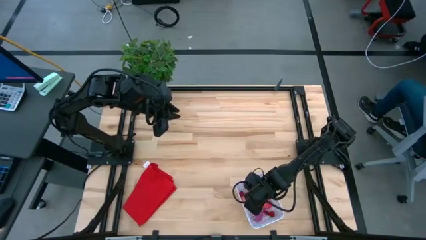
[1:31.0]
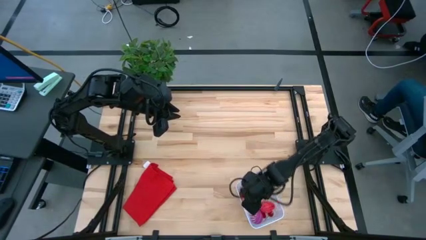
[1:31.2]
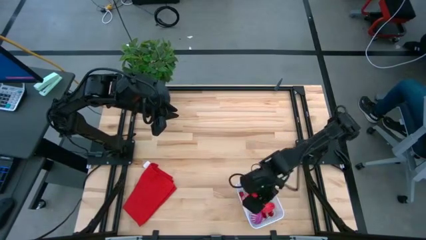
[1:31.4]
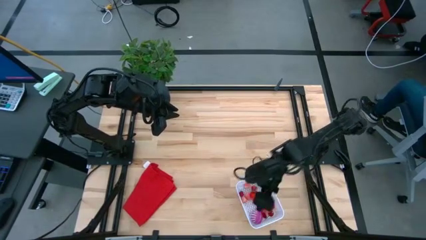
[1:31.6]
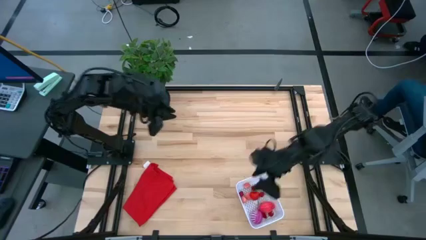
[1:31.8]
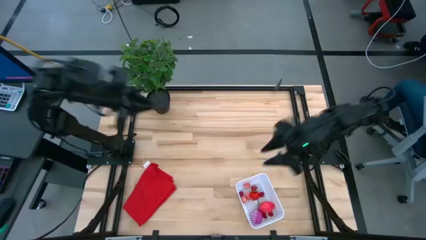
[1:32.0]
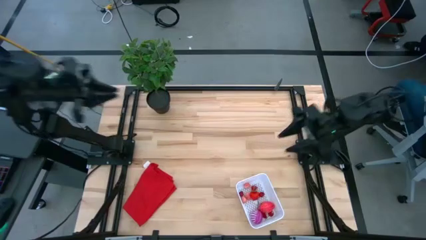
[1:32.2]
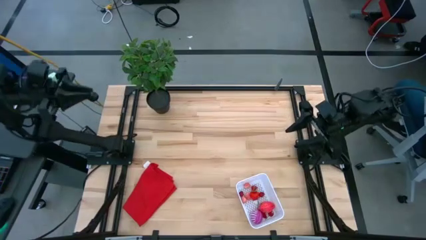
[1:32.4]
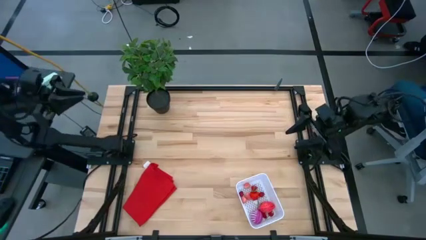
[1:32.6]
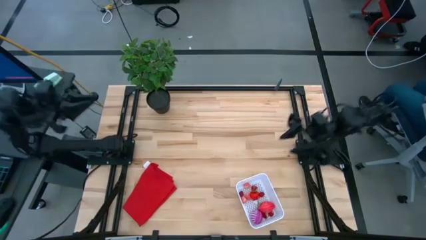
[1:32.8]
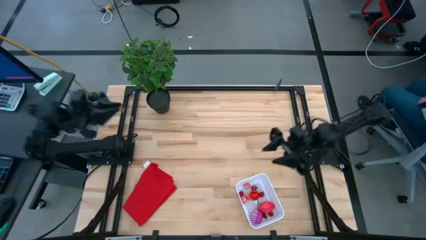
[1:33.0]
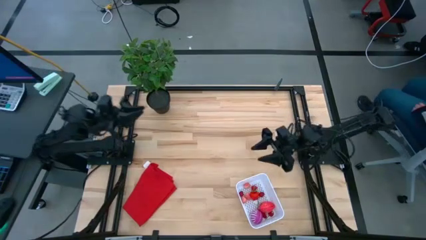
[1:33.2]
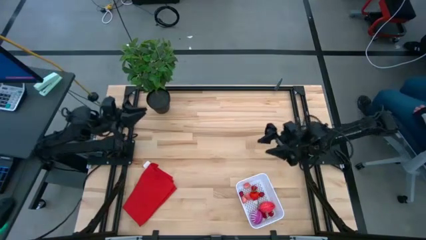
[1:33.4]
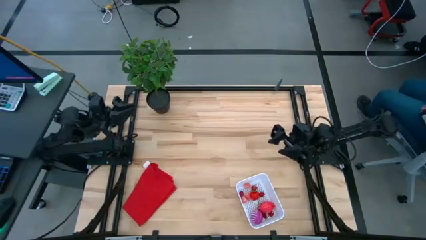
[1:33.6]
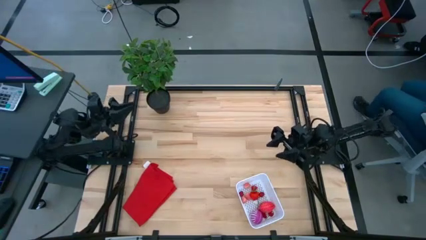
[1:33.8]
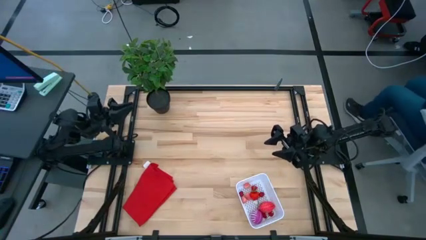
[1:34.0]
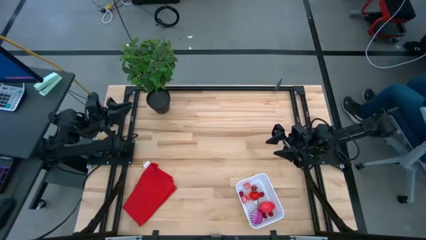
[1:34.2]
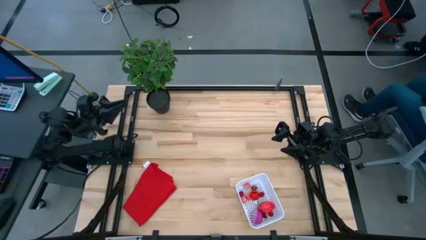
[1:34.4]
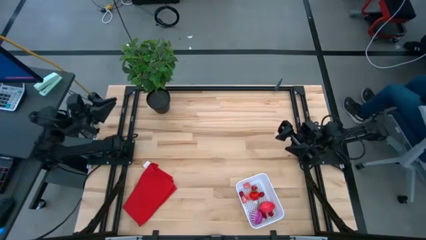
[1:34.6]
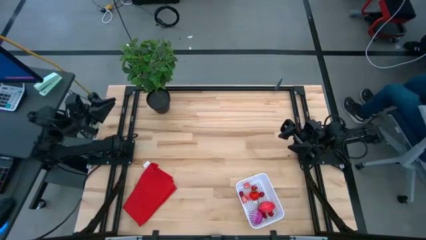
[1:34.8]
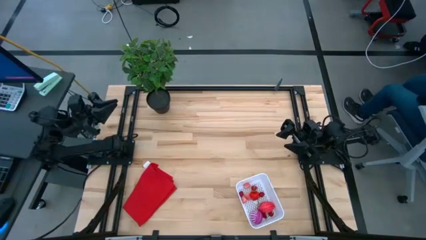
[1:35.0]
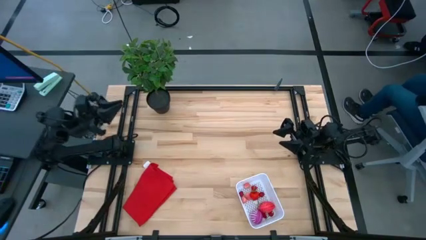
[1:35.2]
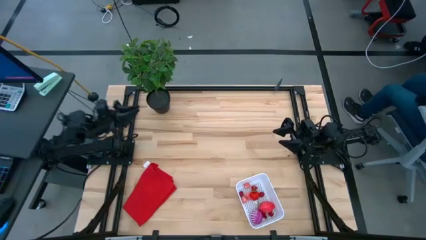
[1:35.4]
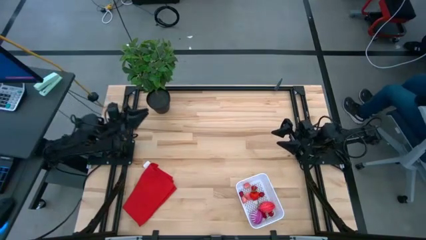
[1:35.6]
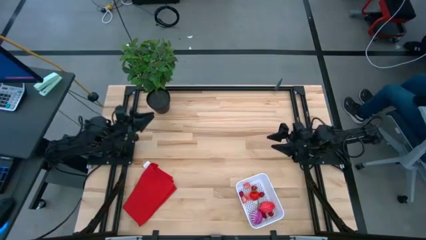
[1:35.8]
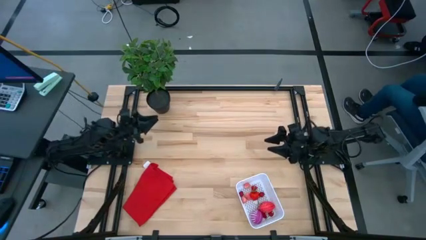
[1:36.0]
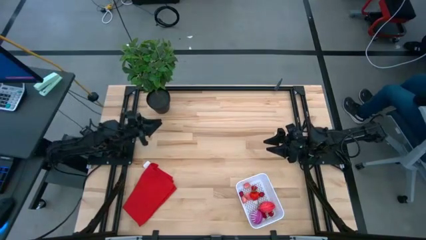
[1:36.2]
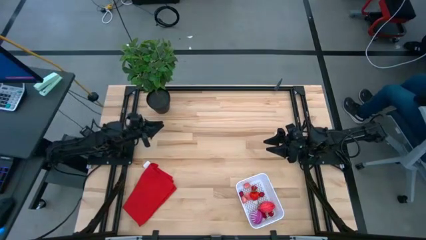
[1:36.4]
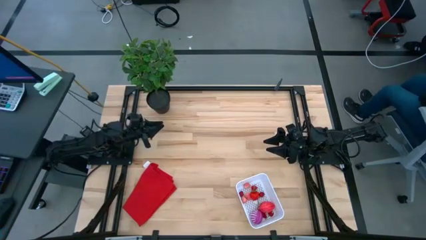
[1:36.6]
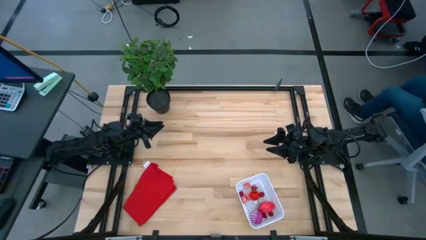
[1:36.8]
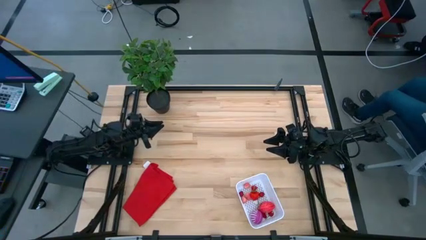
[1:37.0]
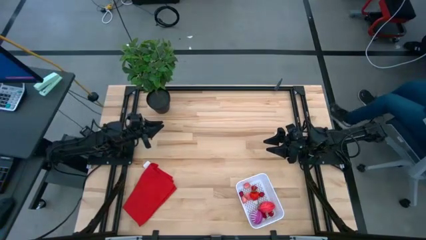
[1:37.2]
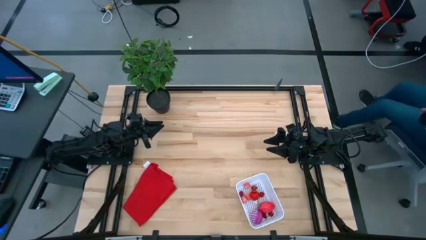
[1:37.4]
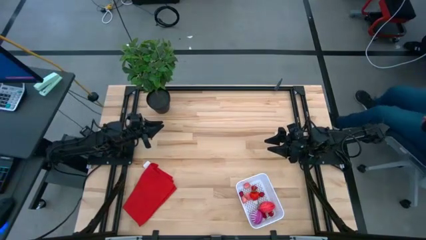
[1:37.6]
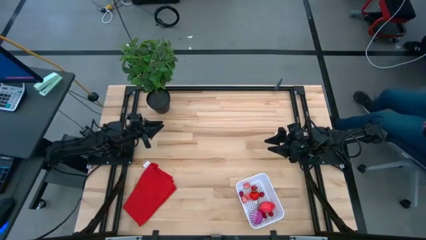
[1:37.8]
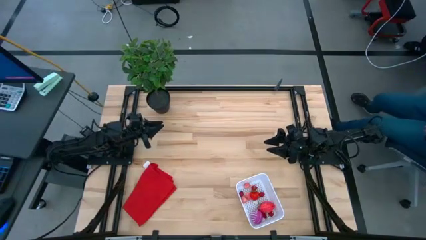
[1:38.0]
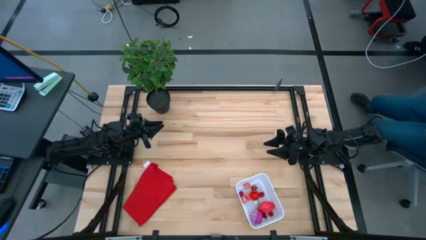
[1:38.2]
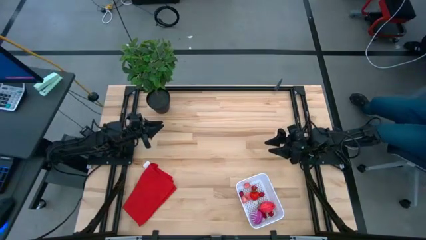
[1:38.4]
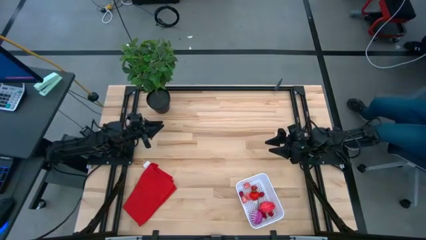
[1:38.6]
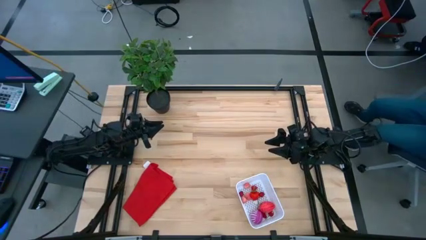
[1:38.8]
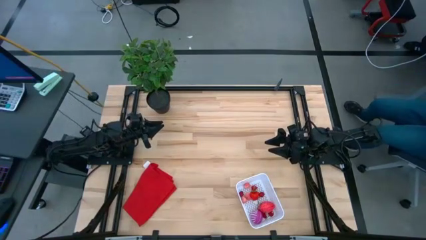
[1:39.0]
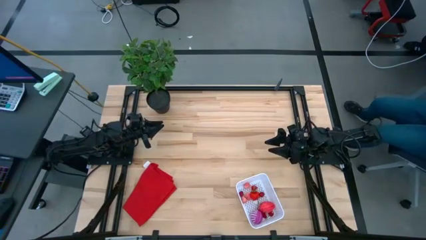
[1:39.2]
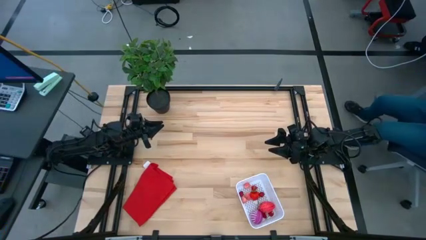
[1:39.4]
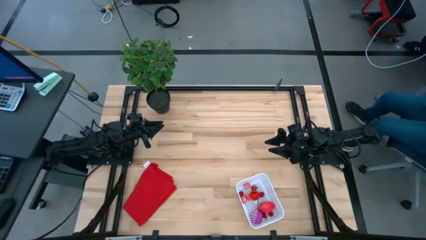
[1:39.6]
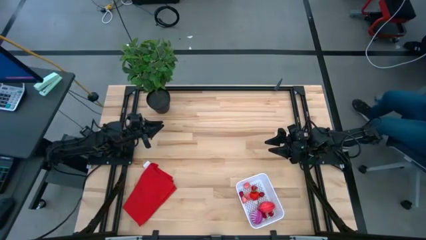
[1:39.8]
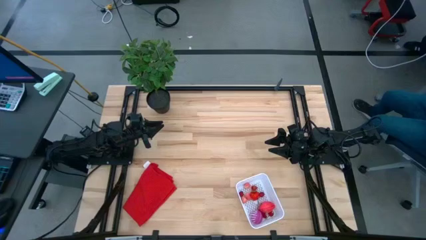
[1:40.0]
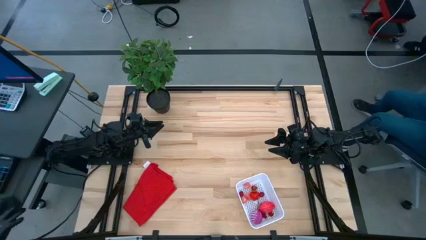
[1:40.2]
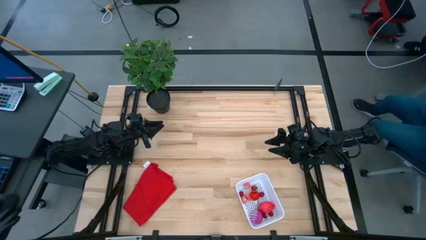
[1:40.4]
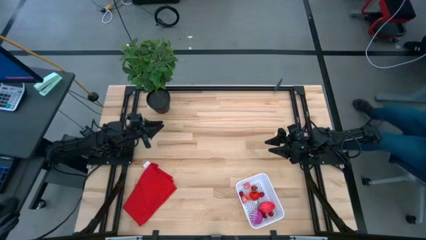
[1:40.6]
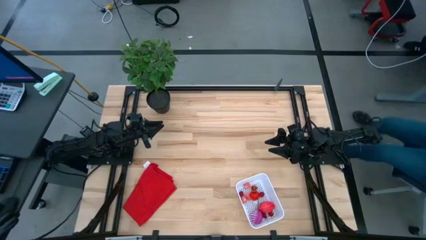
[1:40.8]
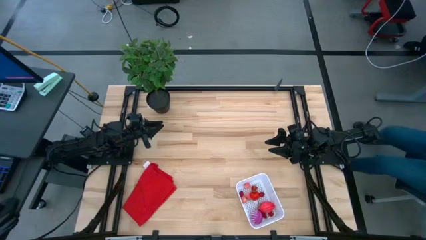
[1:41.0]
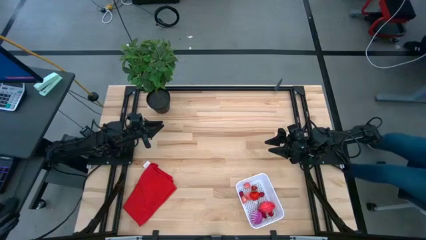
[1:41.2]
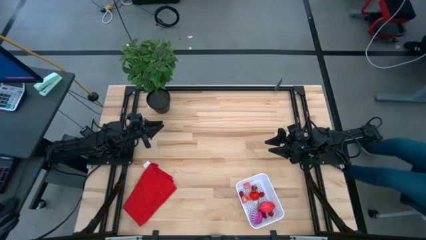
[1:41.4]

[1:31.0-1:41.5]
Task: Pick and placing Produce into tupperware
Return to Home Position

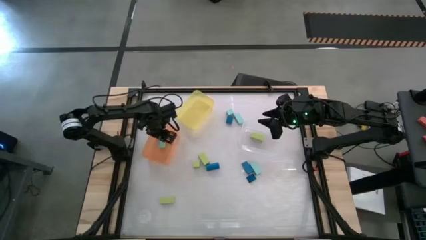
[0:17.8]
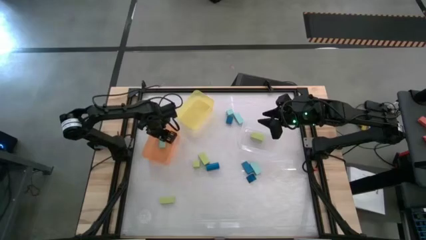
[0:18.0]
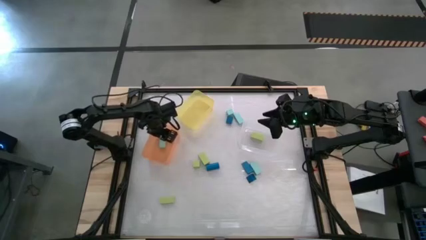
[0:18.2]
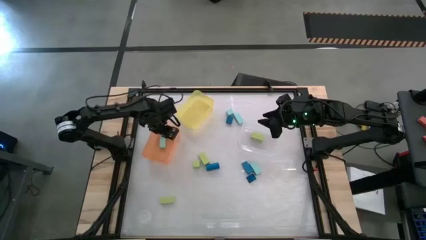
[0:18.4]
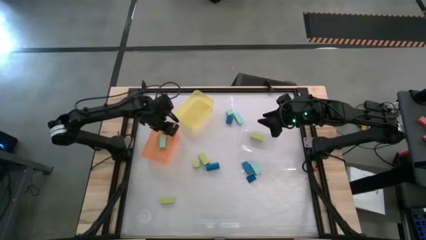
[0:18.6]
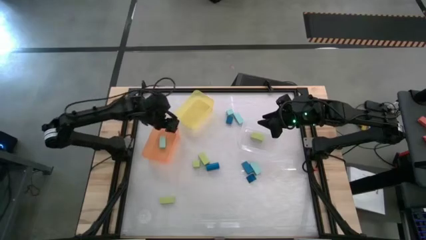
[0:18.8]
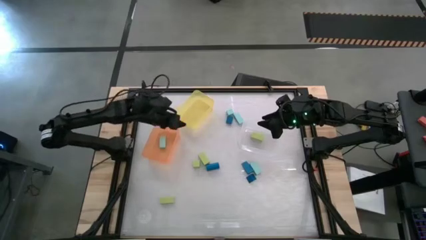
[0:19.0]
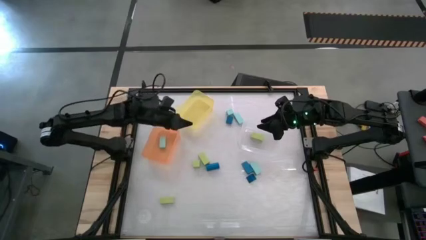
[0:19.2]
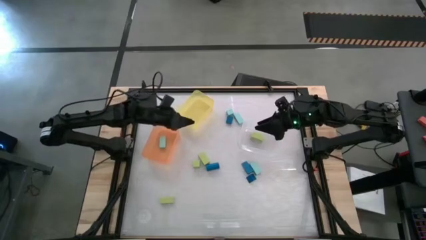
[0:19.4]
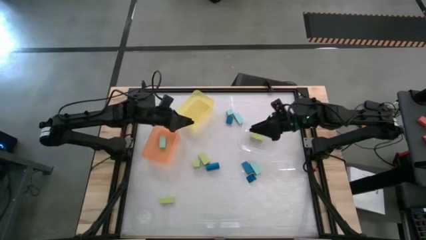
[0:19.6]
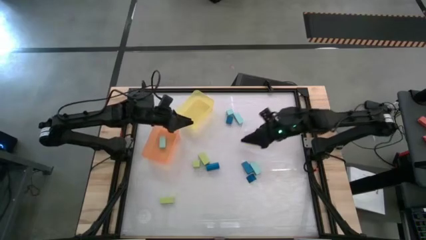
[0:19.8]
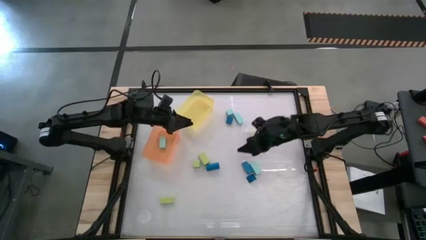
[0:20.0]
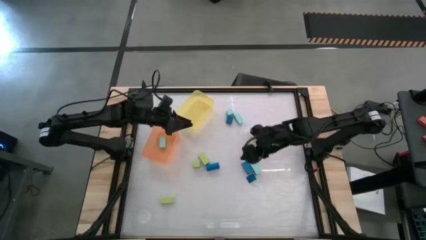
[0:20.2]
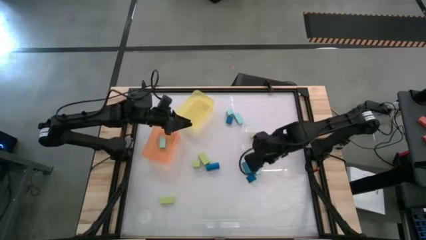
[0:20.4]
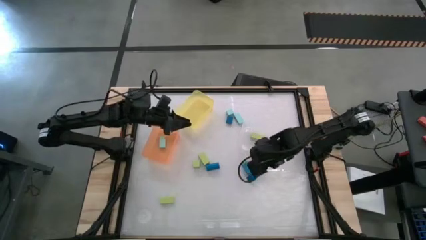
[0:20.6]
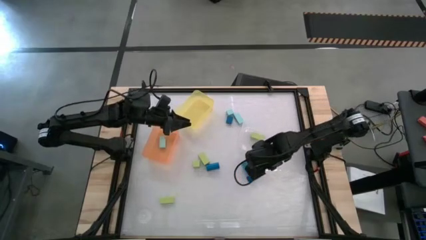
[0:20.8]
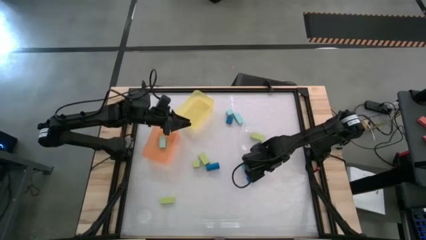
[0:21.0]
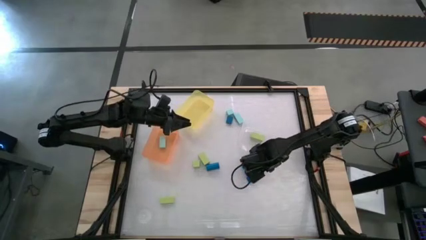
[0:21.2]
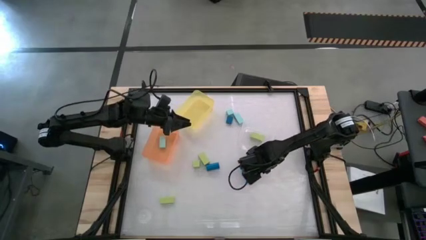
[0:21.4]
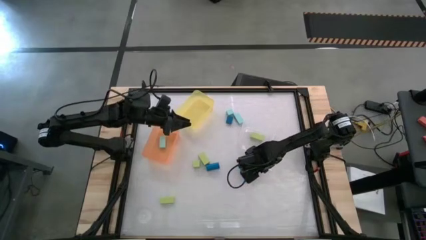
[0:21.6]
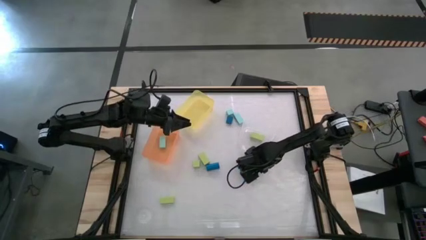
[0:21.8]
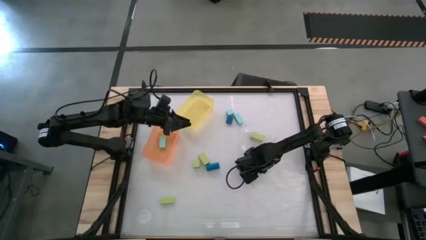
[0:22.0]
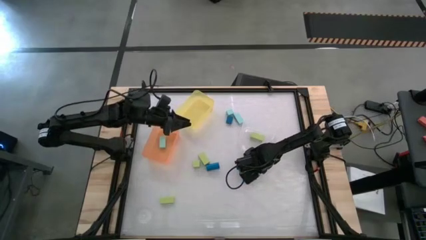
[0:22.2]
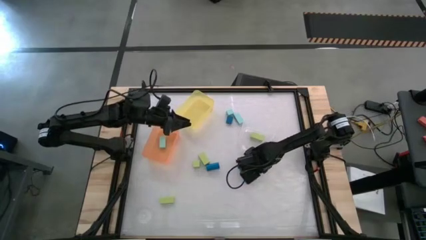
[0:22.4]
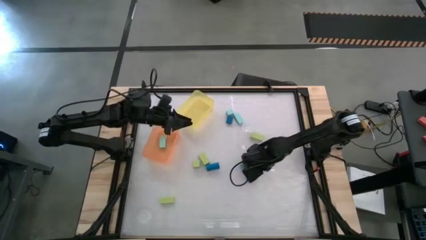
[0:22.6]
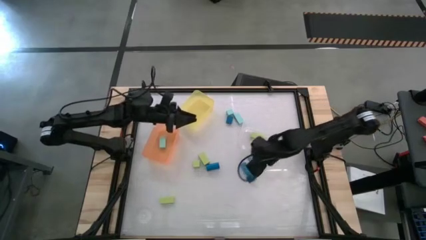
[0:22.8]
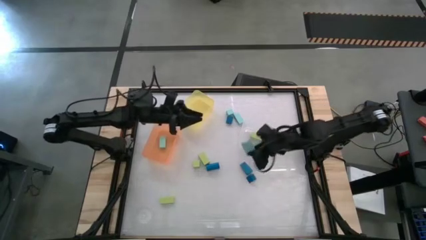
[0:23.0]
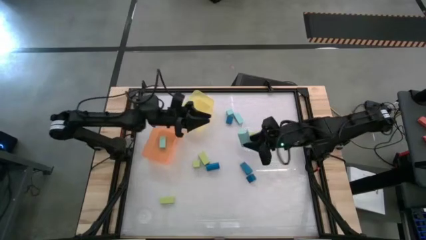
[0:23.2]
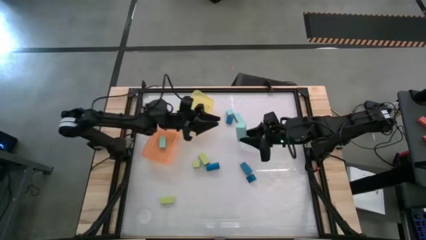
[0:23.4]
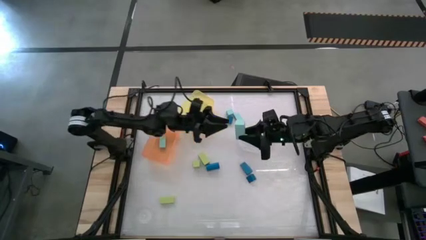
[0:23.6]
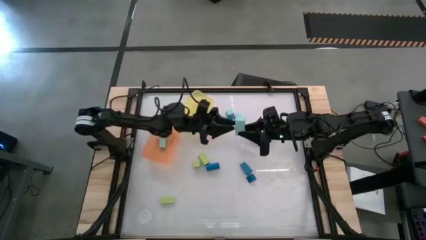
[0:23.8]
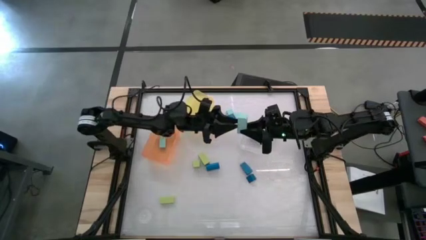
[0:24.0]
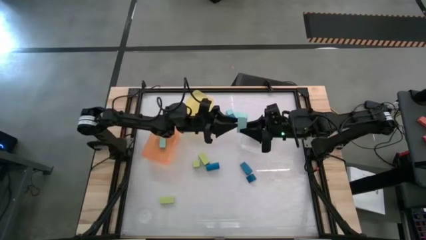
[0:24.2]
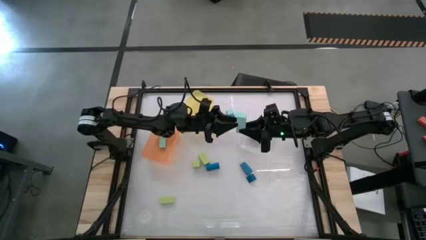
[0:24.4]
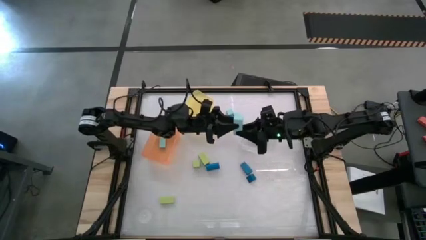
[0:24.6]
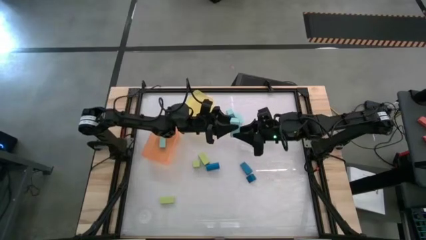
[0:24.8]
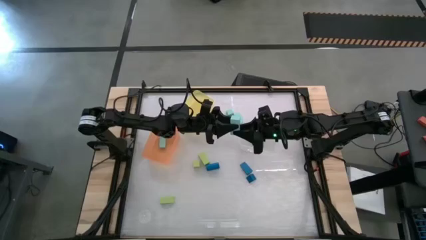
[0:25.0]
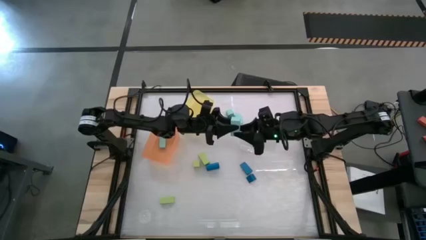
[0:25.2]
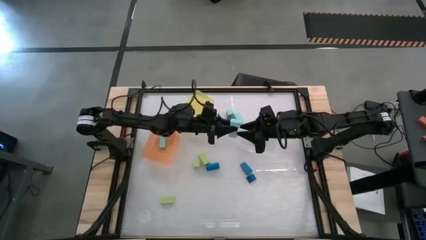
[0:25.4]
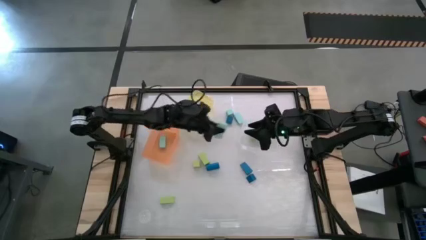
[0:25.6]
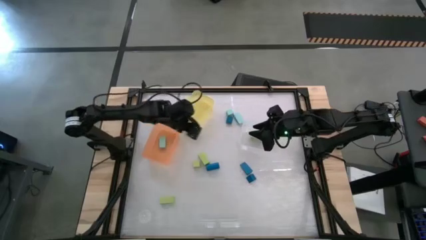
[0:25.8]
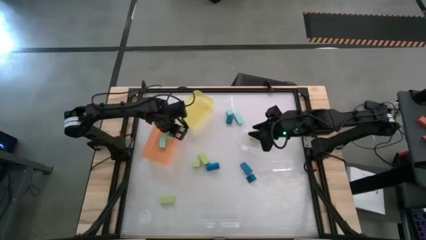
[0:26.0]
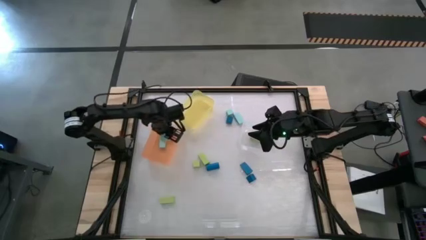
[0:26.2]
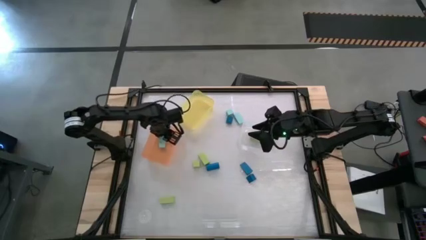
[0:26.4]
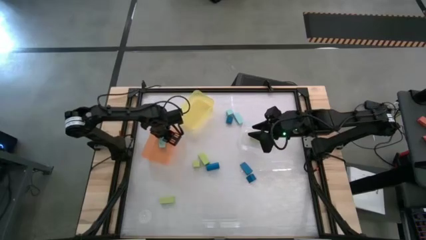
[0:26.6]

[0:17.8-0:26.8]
Task: Sort & place blocks by color
Put the light blue block into the orange bin
